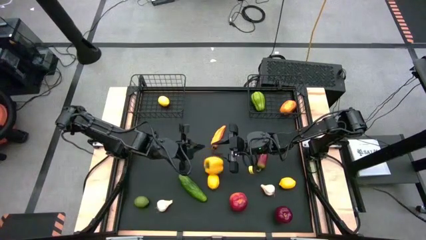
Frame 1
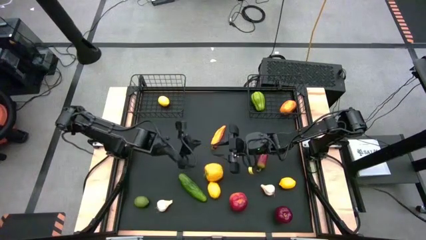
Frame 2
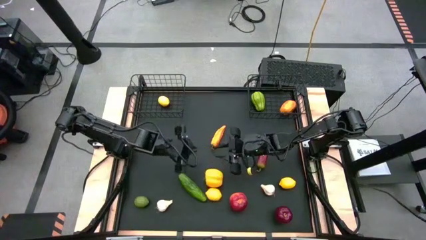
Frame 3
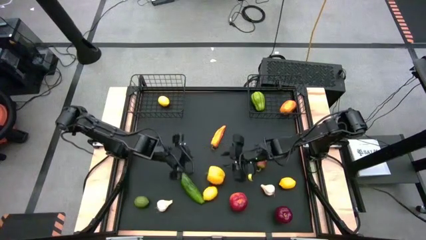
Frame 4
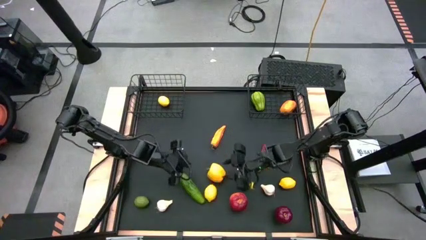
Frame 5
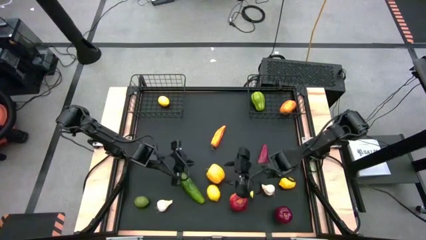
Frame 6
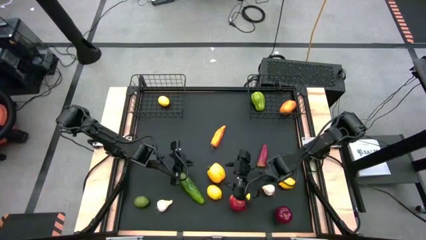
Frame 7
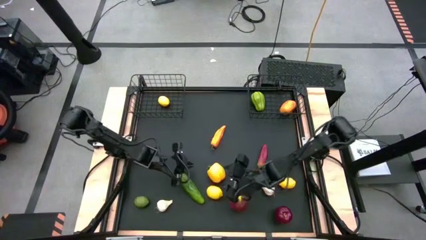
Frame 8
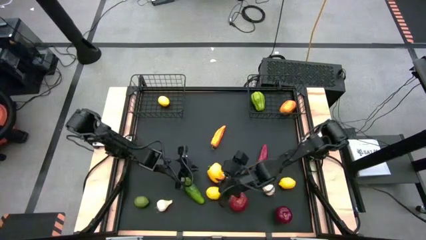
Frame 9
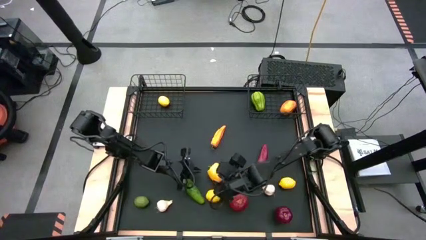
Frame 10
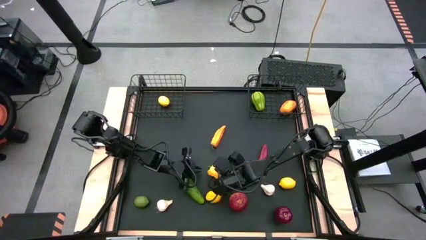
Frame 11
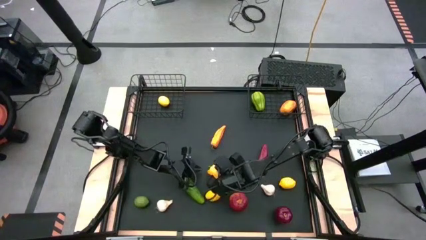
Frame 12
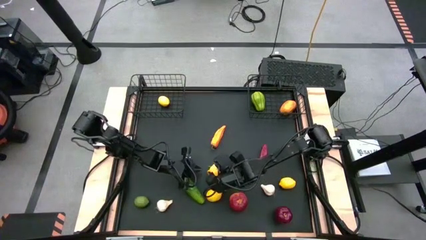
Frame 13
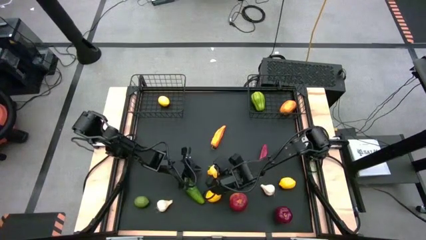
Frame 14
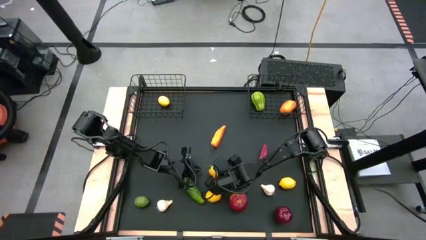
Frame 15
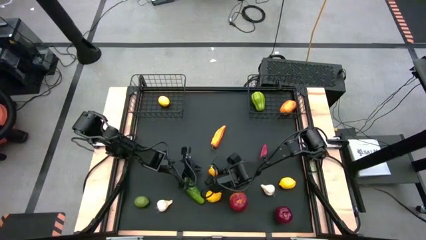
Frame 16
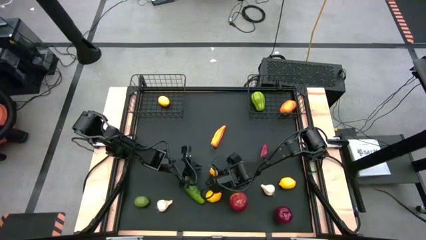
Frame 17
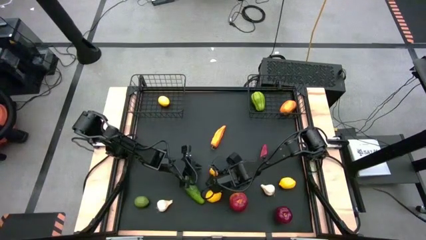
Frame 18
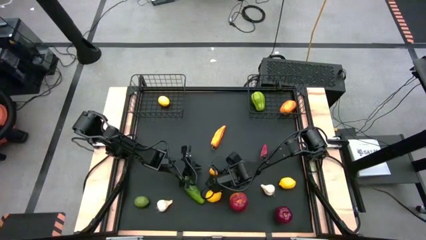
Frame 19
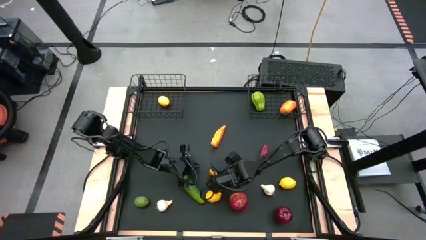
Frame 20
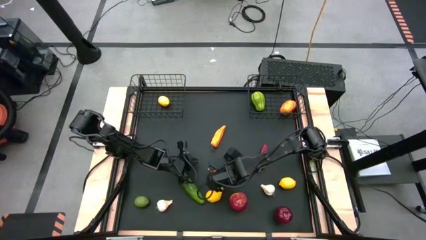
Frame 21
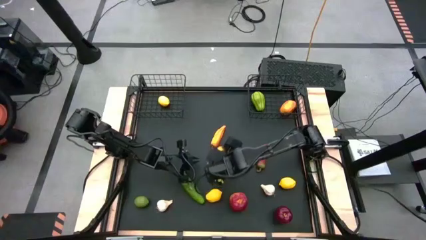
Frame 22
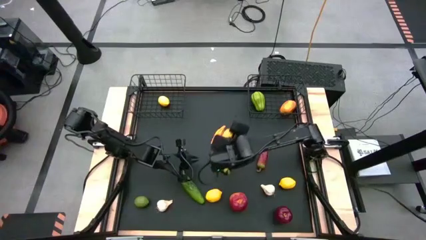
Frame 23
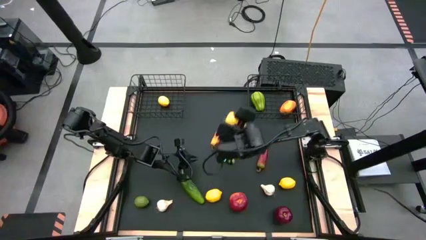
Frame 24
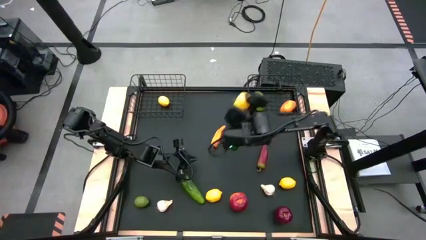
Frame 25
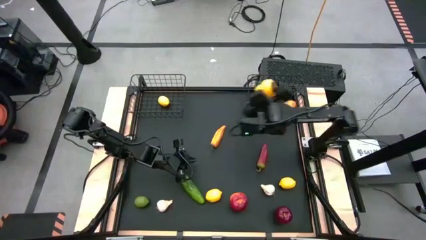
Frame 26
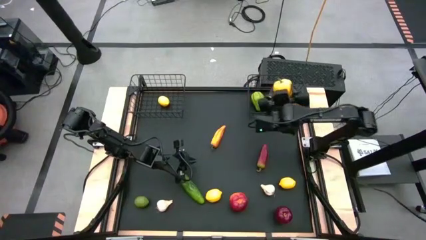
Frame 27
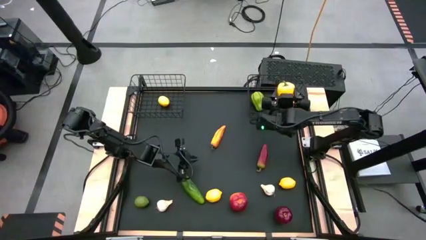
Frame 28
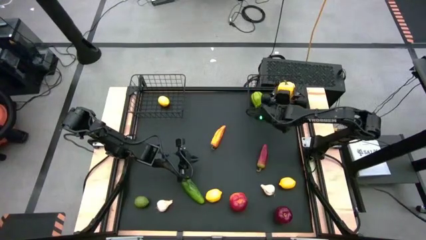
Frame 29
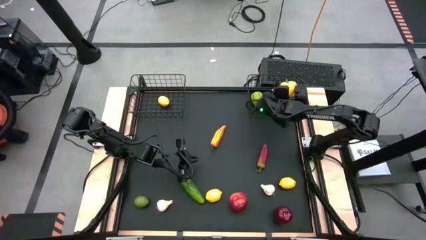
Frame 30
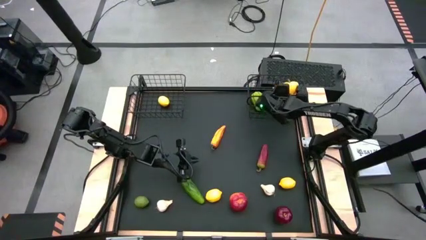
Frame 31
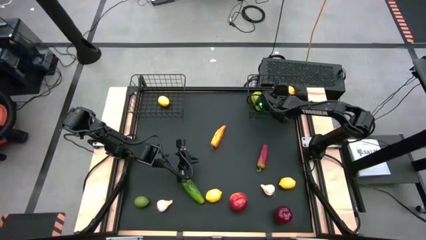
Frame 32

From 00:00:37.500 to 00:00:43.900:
Task: Sort produce into baskets
Put the yellow bell pepper into the right black wire basket

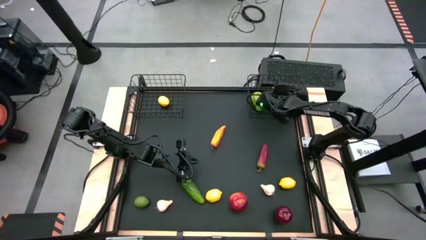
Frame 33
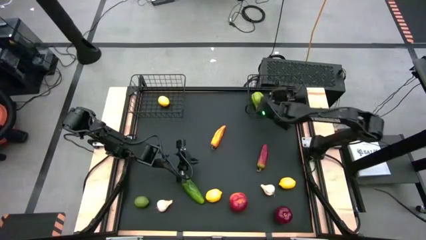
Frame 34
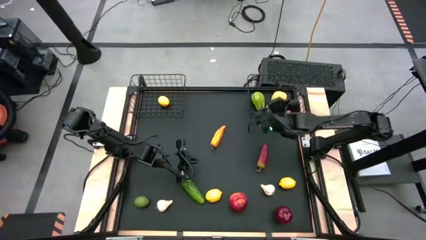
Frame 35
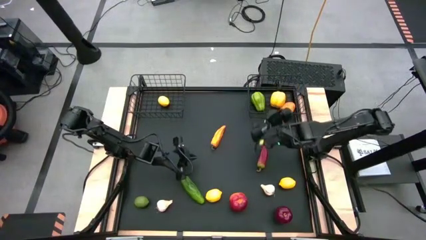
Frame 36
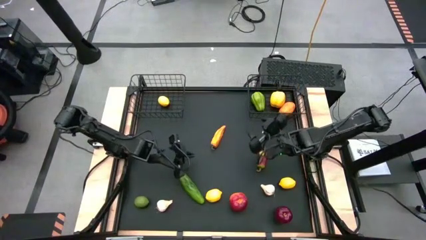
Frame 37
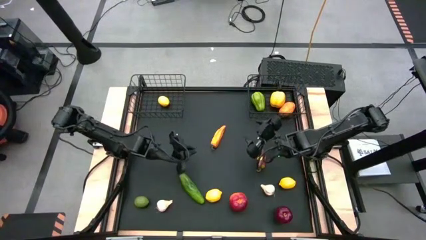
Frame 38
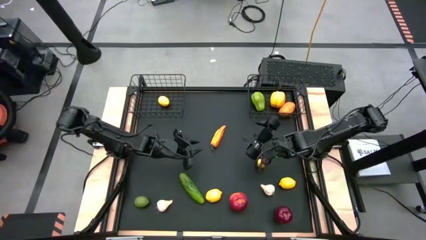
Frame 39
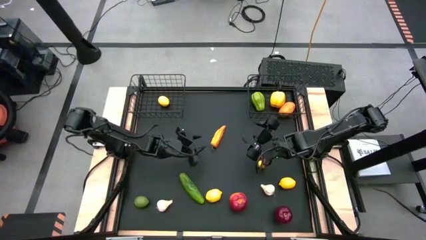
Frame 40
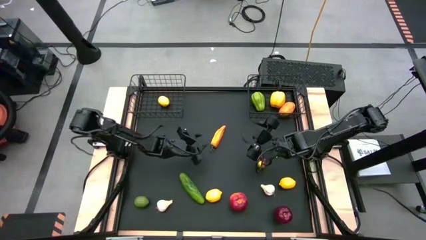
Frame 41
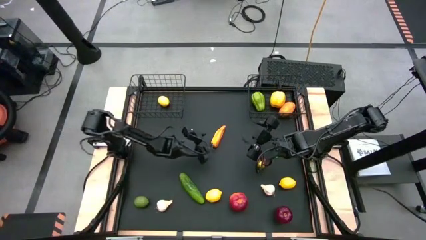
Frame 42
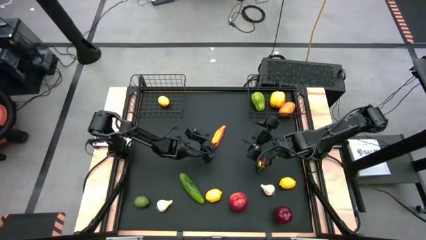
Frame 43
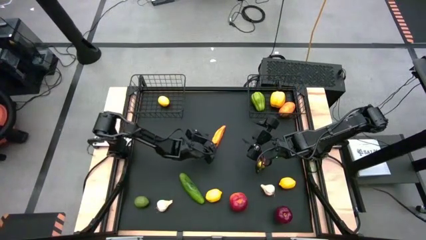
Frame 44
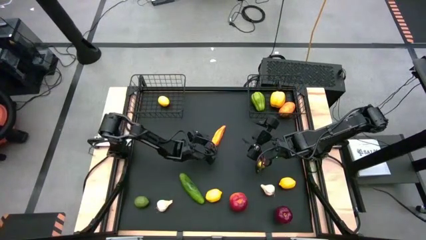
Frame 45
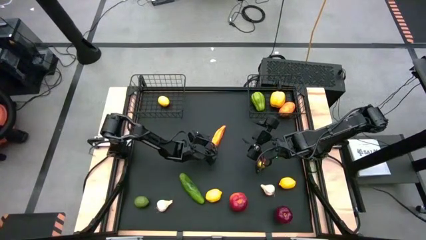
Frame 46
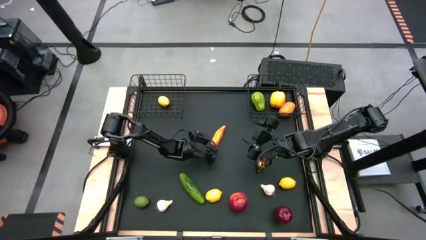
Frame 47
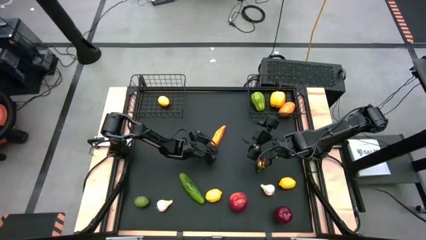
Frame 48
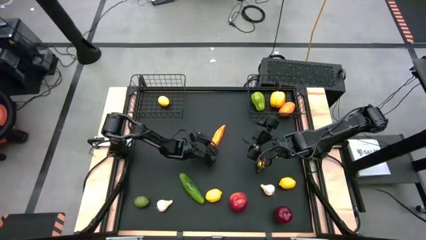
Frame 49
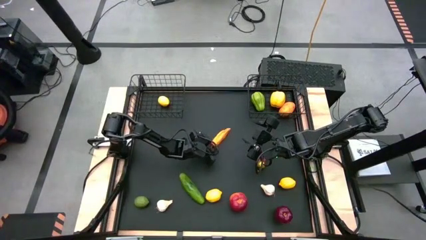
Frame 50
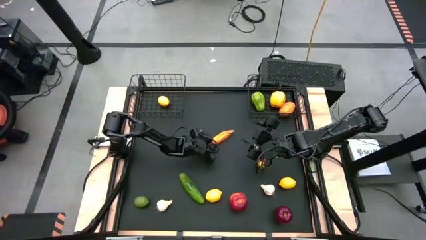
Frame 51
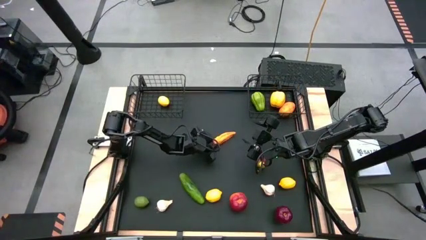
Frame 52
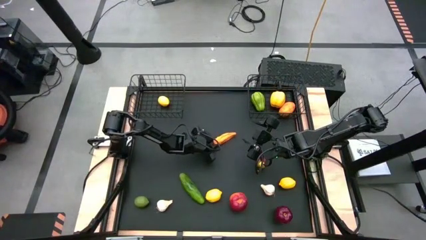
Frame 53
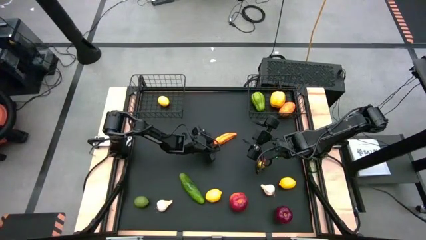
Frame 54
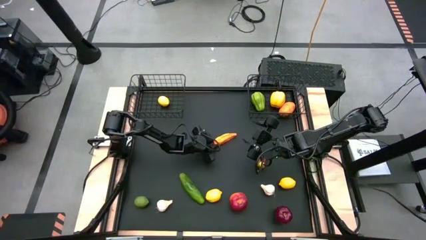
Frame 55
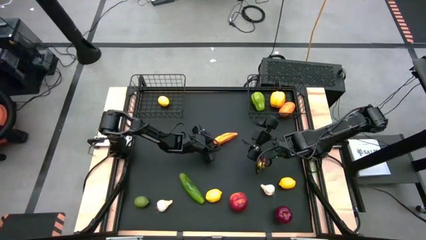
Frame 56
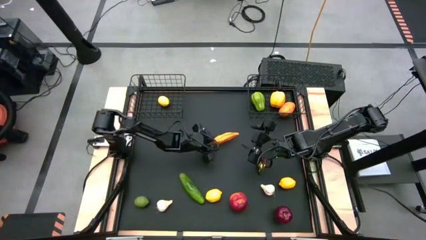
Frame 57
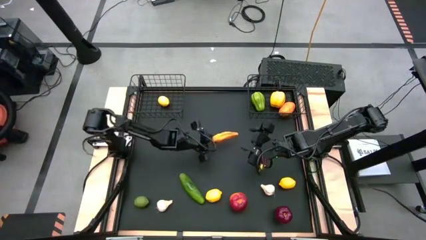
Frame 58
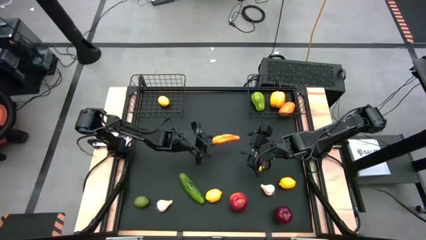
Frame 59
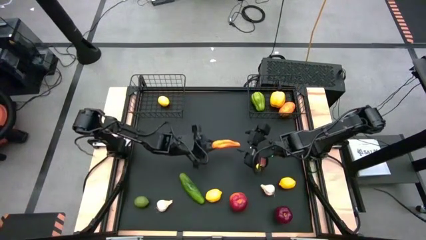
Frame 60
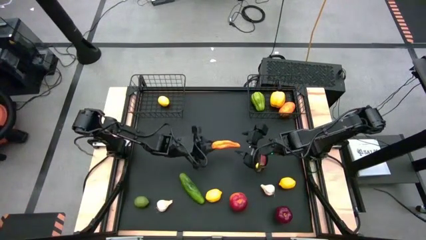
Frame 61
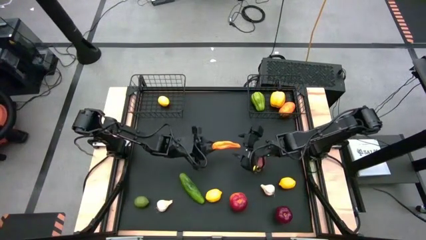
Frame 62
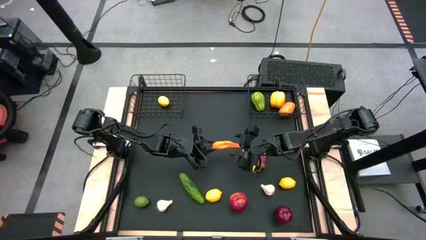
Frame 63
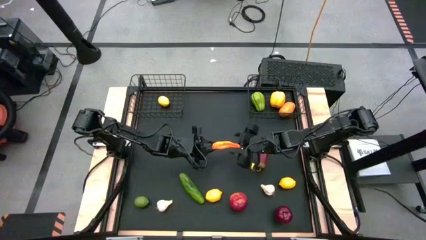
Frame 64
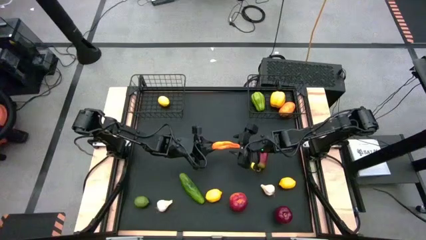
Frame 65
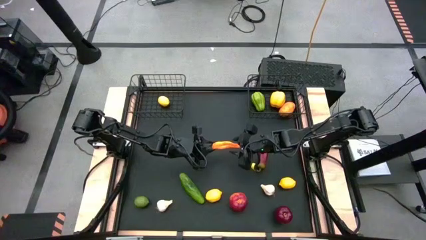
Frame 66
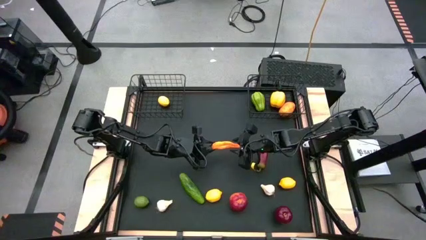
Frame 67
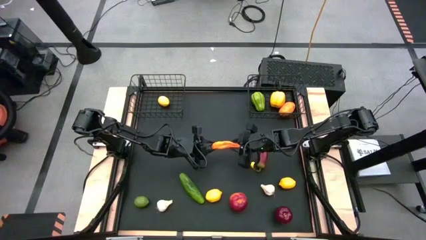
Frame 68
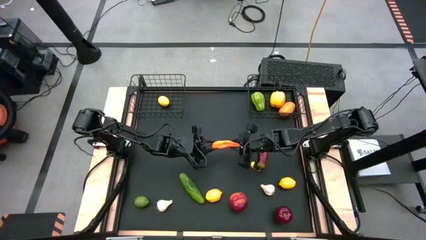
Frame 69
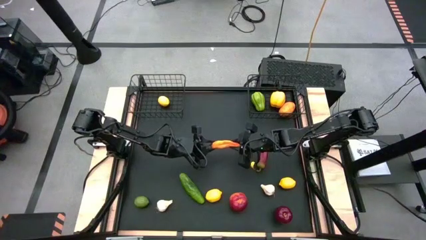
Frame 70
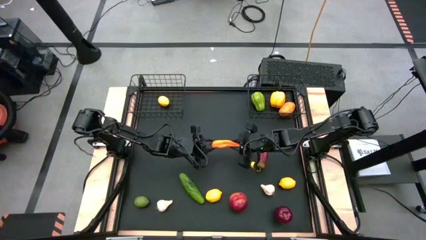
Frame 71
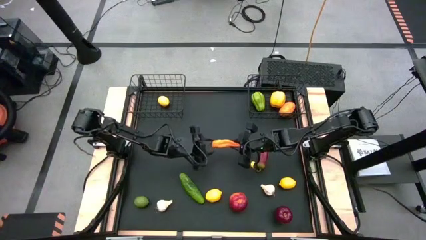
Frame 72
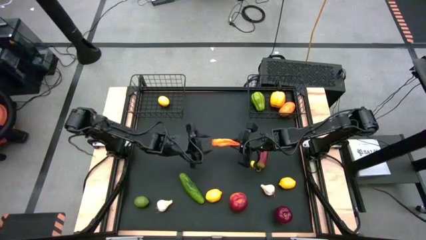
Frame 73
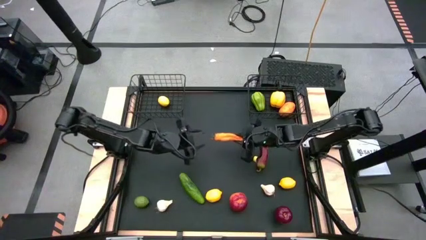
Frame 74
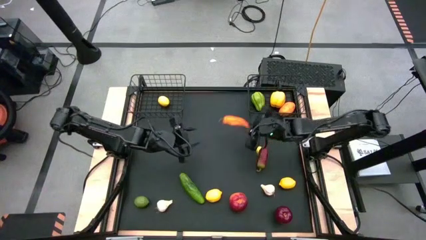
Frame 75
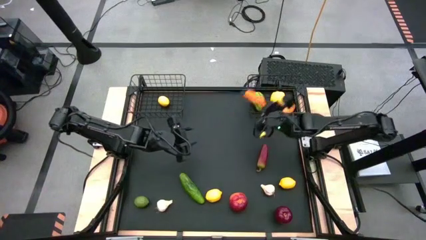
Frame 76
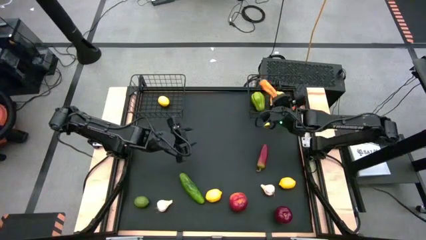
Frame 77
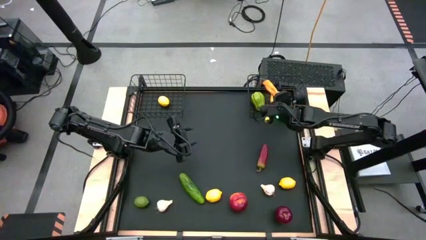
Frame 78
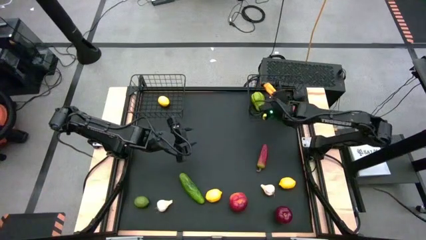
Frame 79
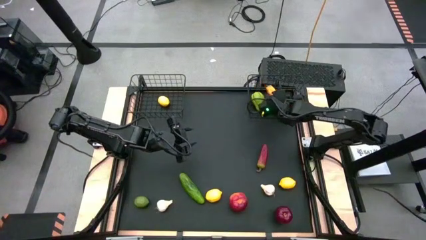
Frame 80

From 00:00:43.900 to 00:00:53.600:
Put the orange chili pepper into the right black wire basket
